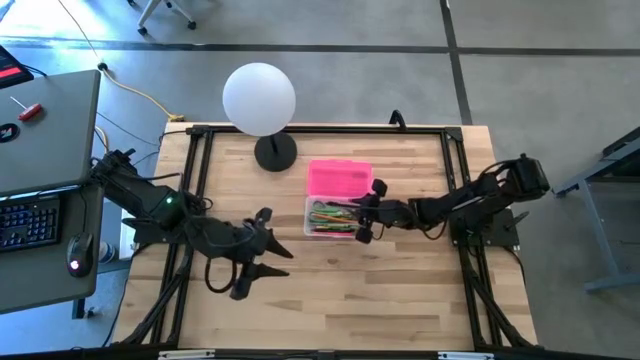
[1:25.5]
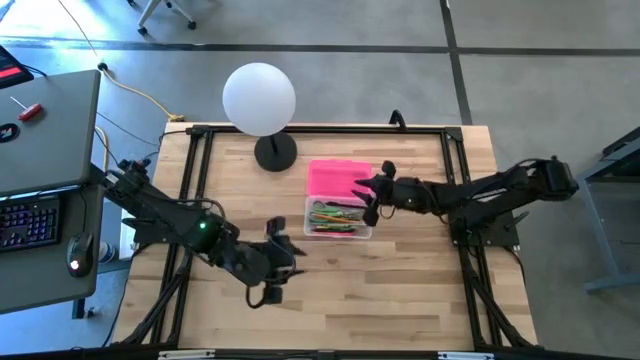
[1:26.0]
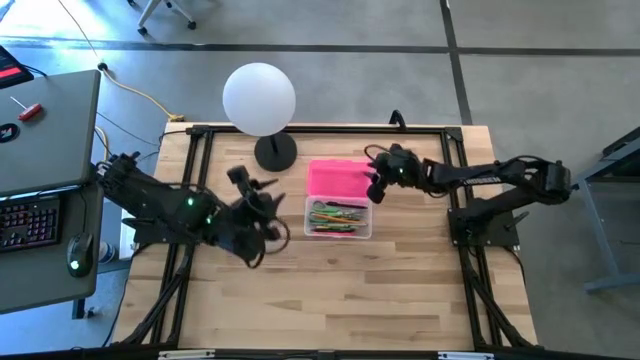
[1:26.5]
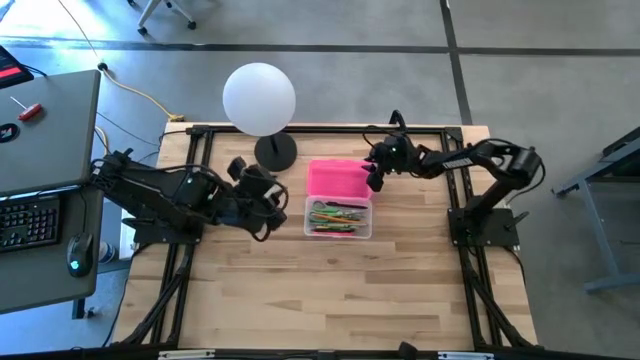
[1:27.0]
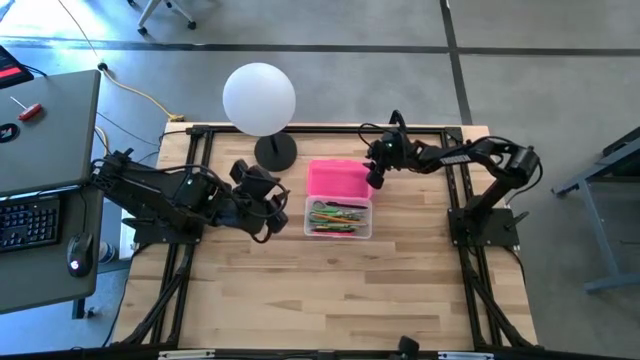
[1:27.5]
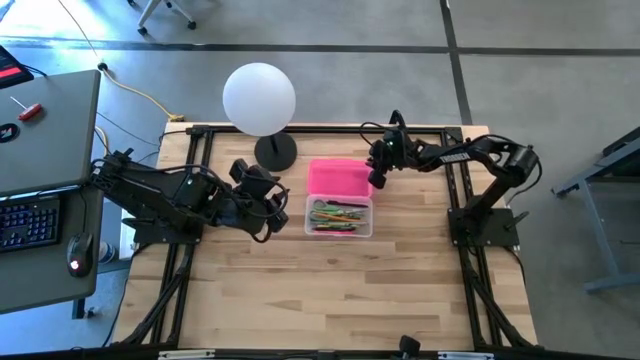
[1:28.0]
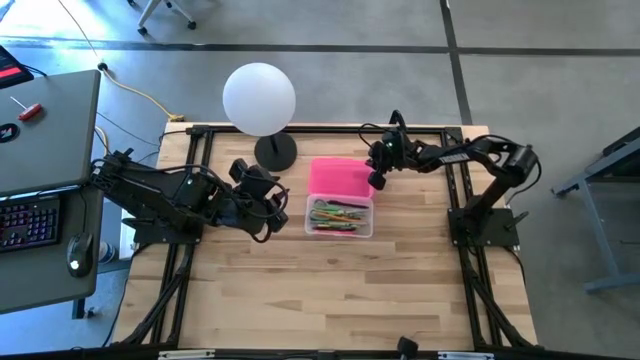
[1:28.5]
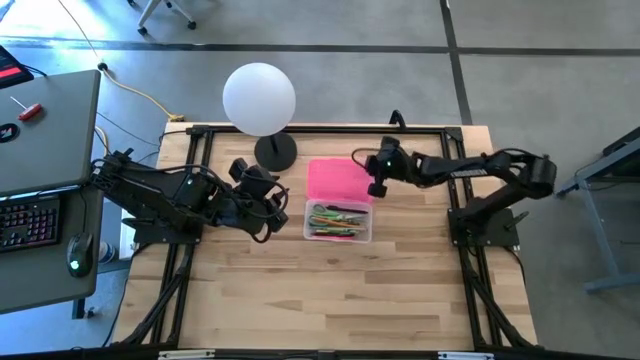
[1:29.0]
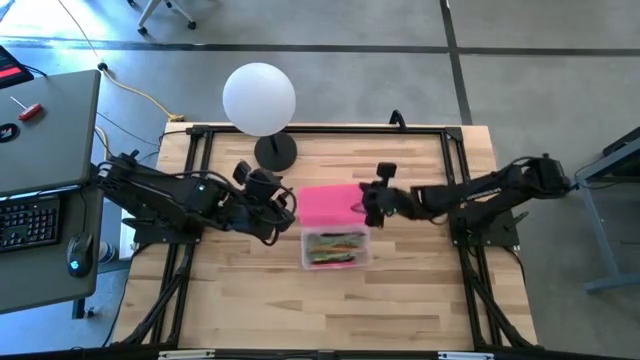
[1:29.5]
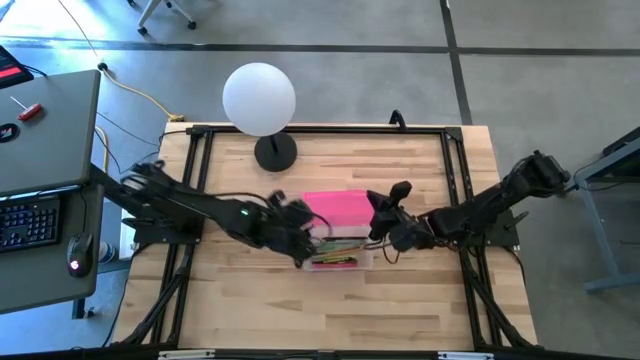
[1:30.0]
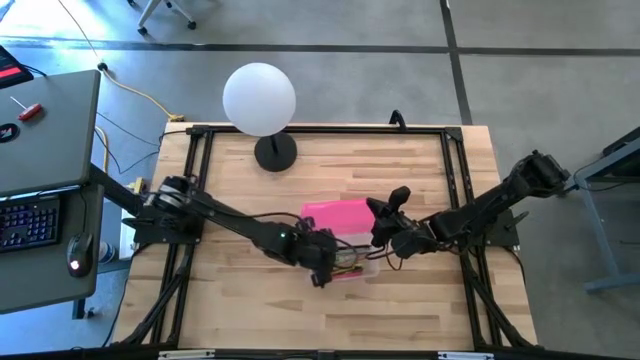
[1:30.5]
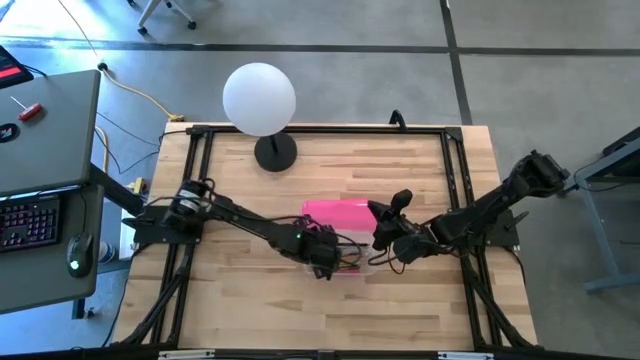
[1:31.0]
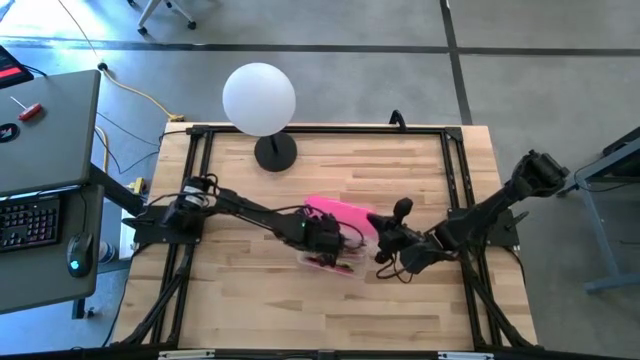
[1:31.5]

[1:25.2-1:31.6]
Task: Pick & place school supplies into a supply box
Close the pink supply box

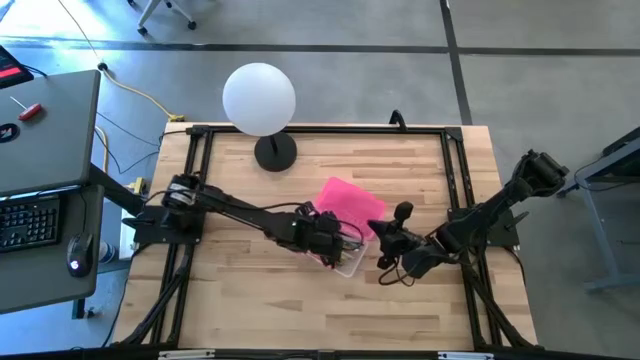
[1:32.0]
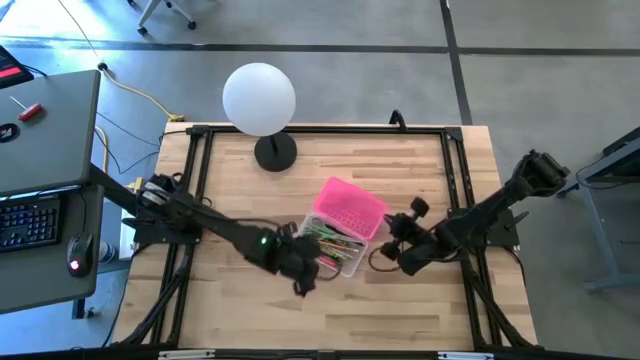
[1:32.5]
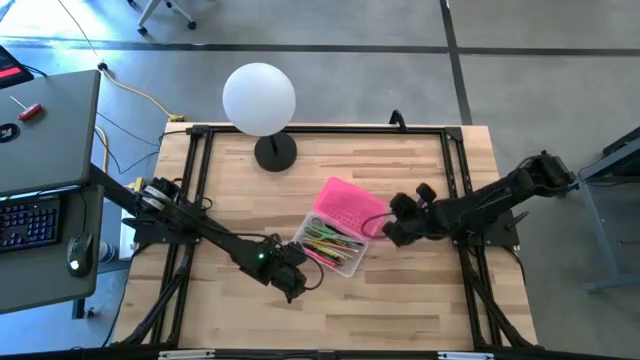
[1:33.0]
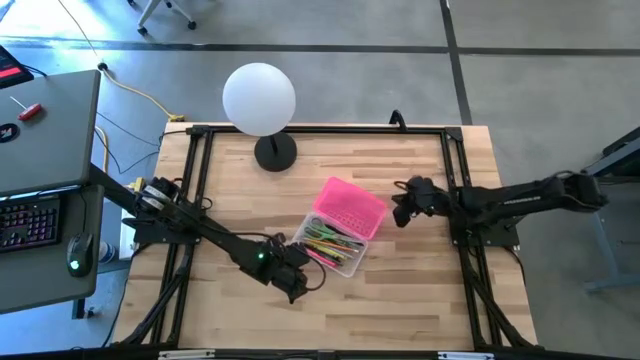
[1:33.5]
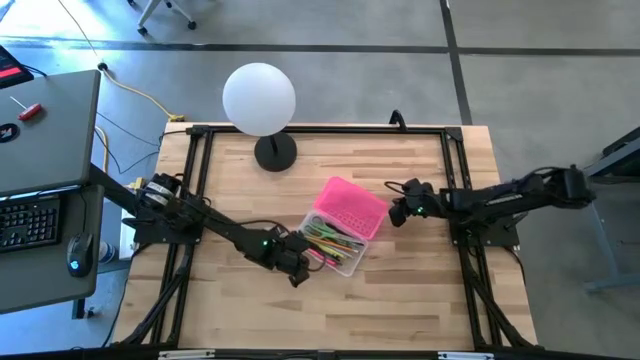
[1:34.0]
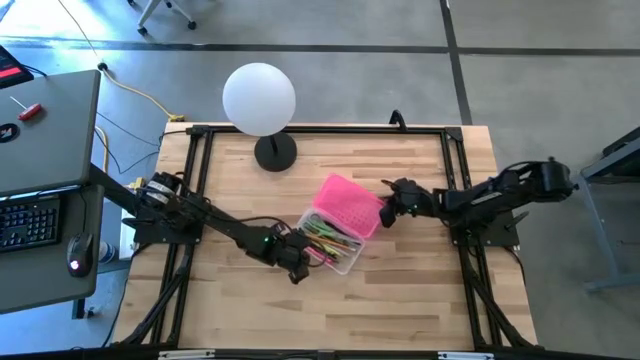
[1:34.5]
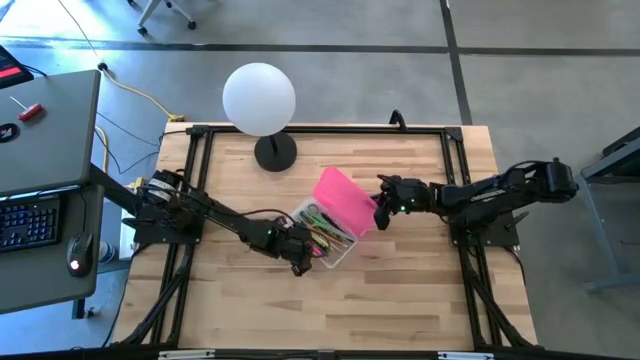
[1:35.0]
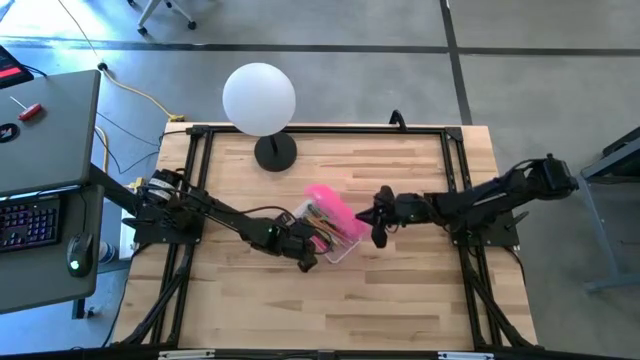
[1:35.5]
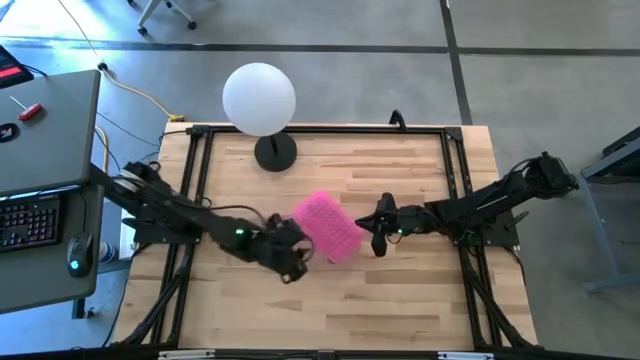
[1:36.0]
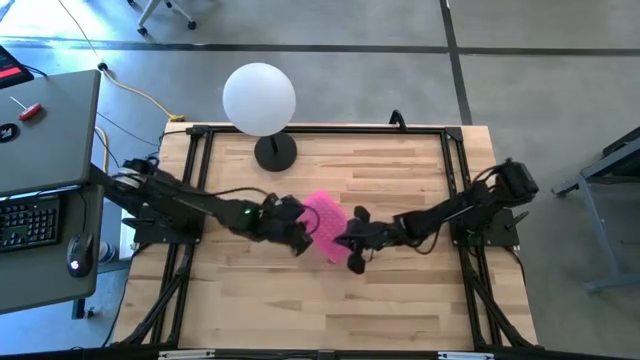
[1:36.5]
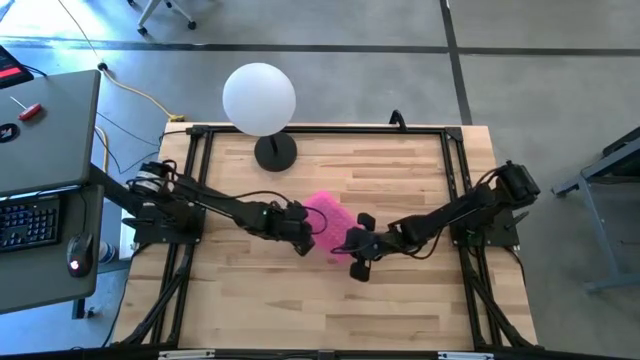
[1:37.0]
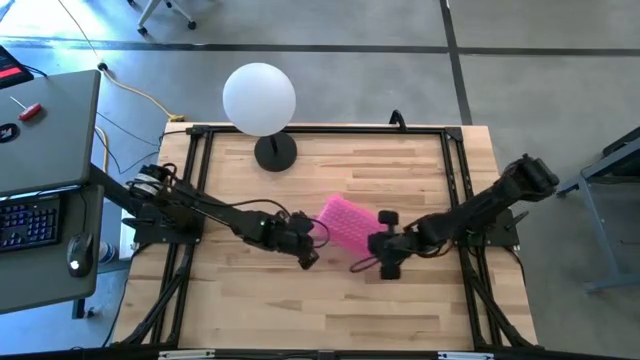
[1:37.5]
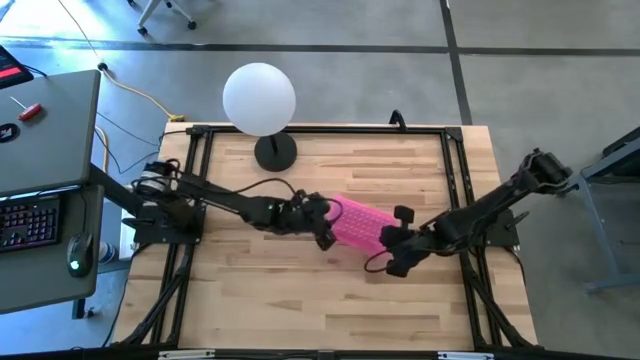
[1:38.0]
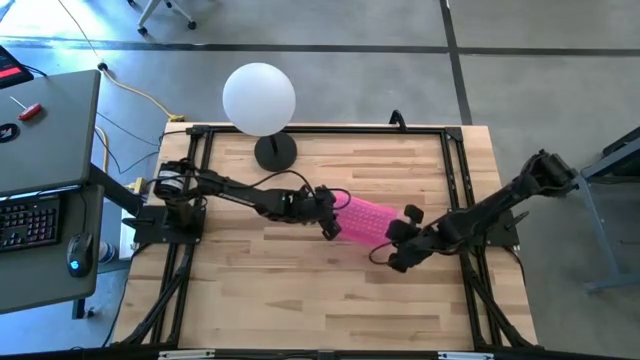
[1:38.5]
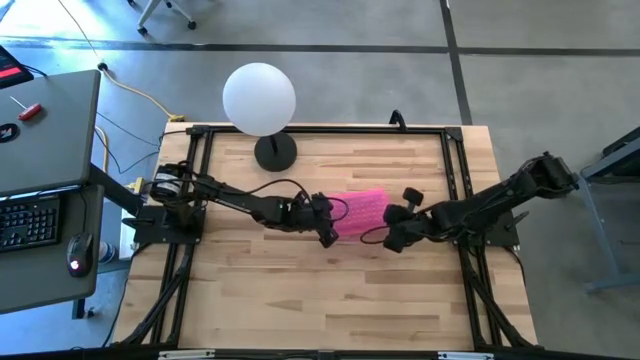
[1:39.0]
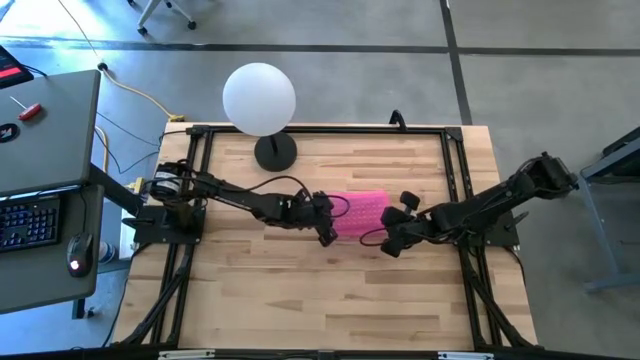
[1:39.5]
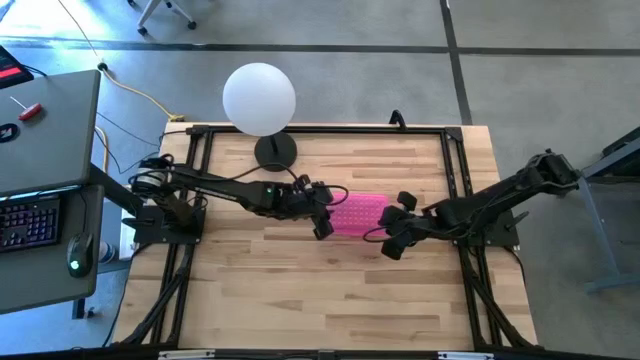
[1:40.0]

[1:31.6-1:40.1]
Close the pink supply box

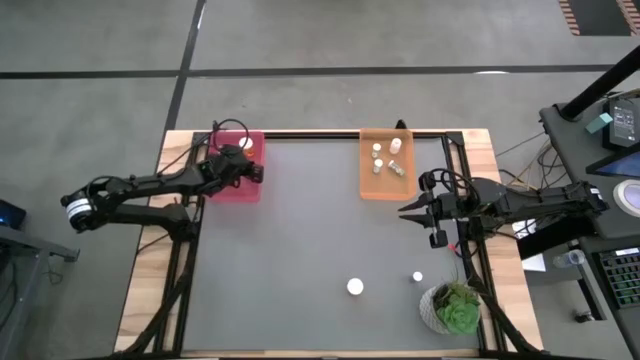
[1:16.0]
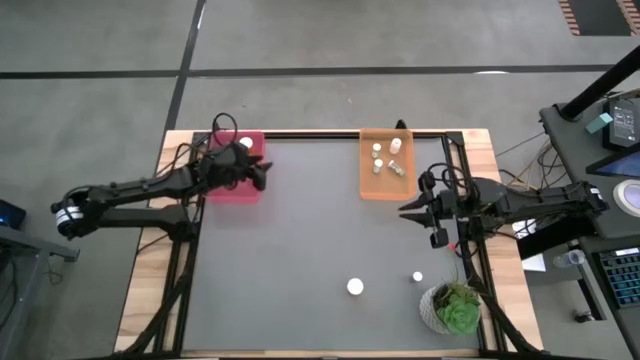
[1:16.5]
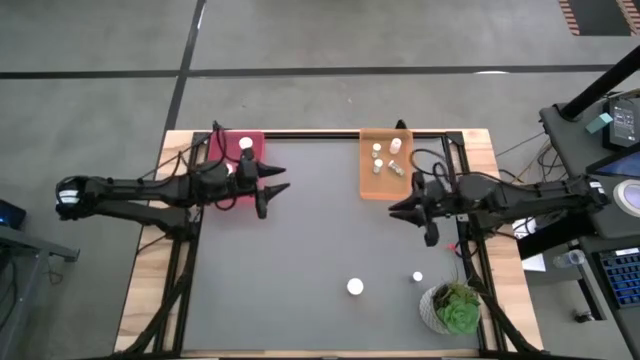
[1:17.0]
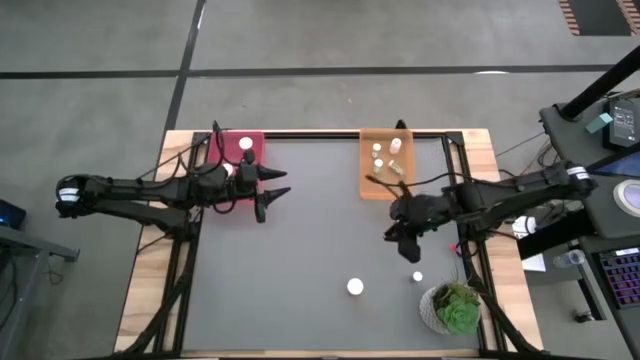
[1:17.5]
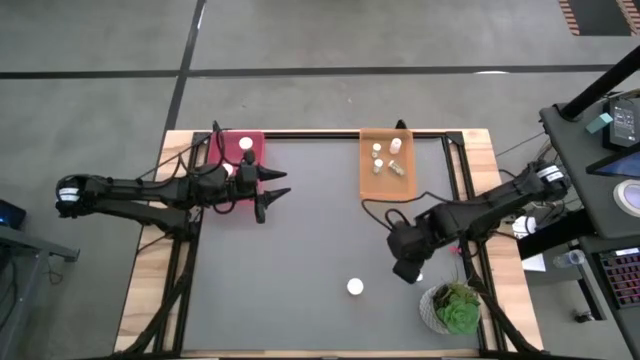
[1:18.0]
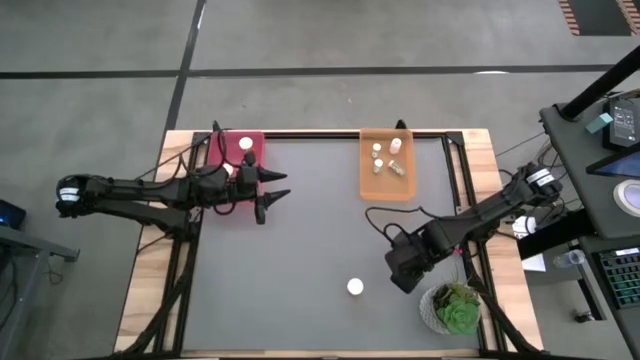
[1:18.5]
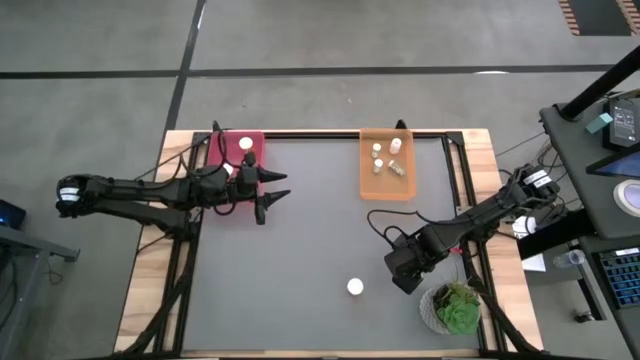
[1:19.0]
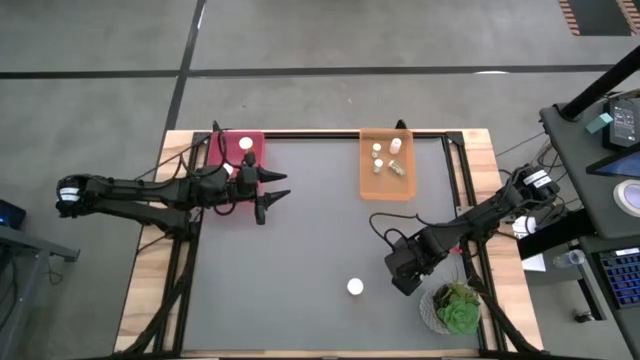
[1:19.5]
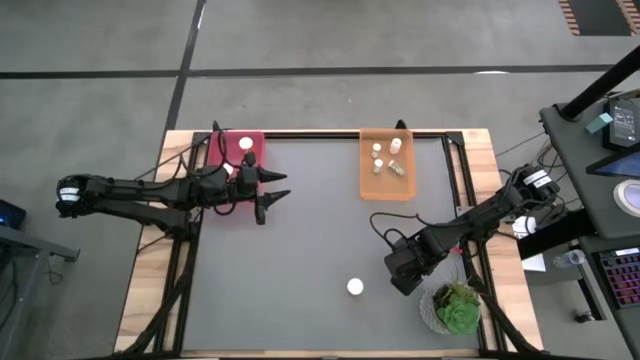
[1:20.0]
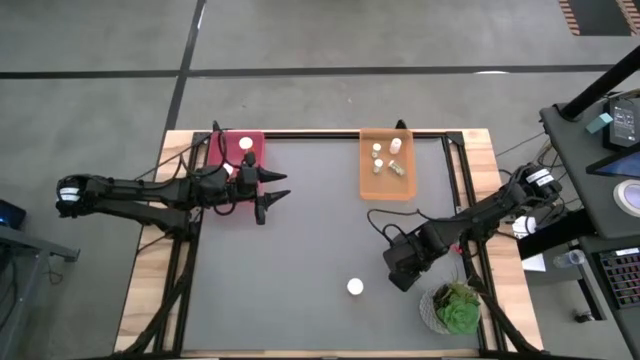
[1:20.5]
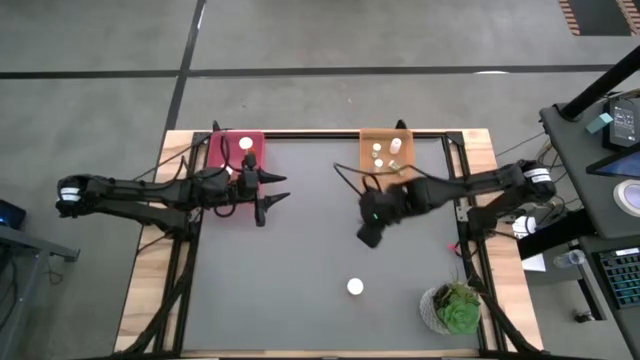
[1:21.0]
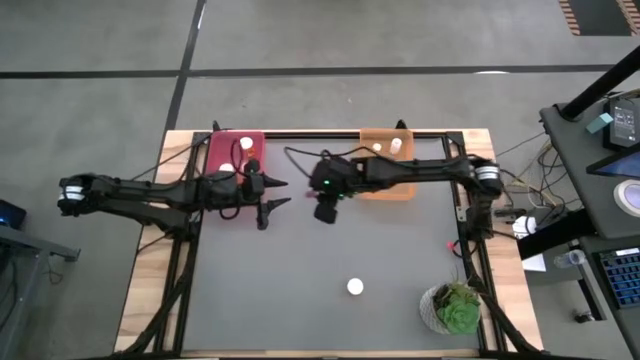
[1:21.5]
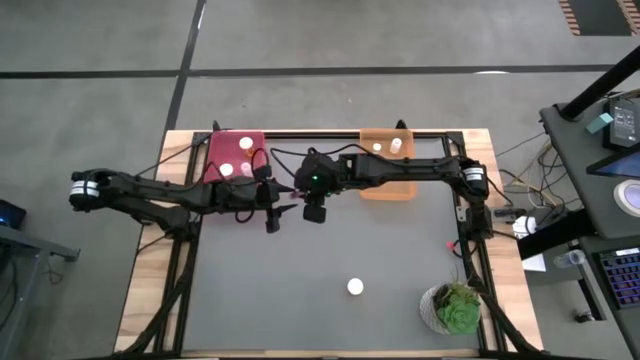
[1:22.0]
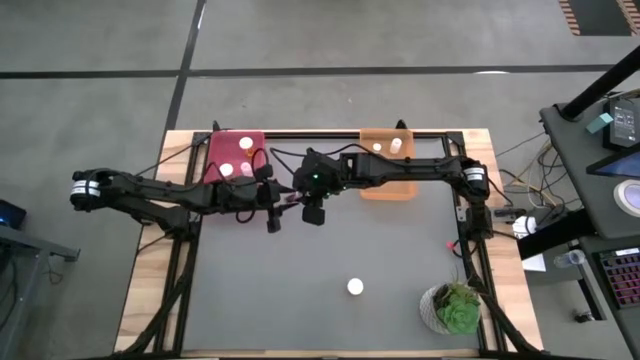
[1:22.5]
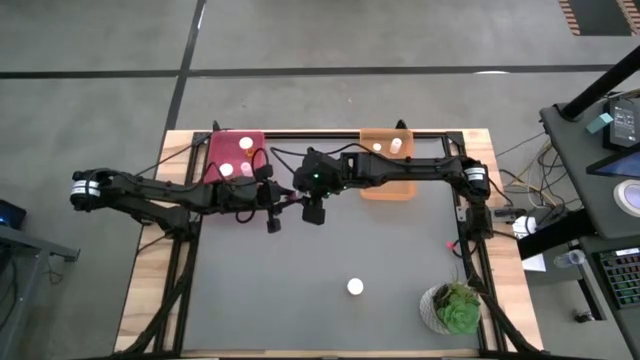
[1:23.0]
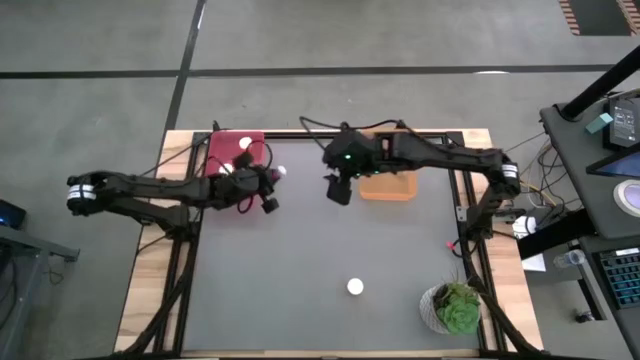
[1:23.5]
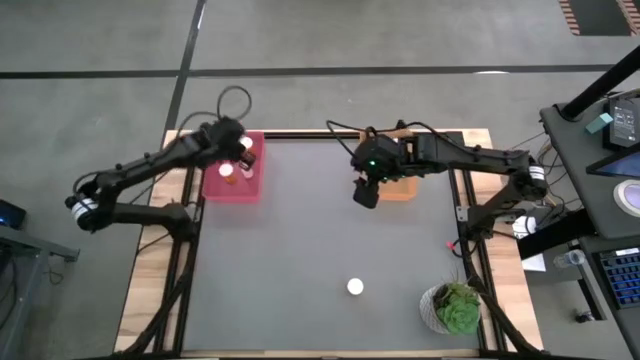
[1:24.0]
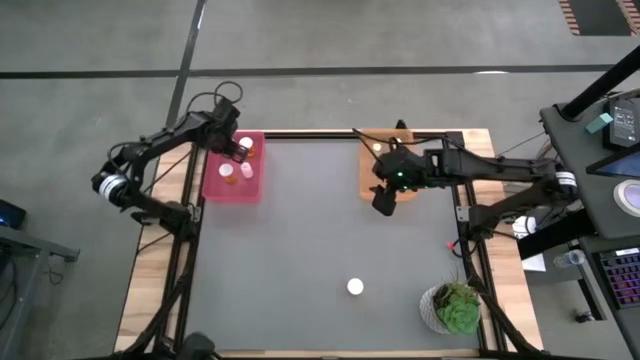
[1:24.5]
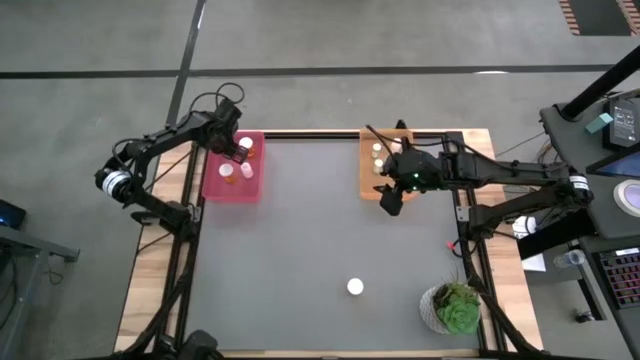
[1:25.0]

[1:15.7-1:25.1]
Task: Pick and place medicine bottles into bin by pill shape (circle, oval)
Put the blue capsule bottle into the pink bin
